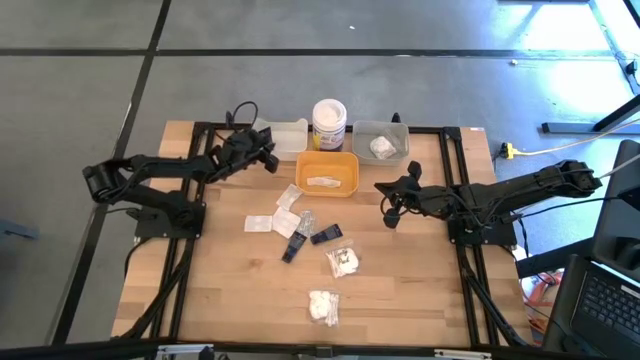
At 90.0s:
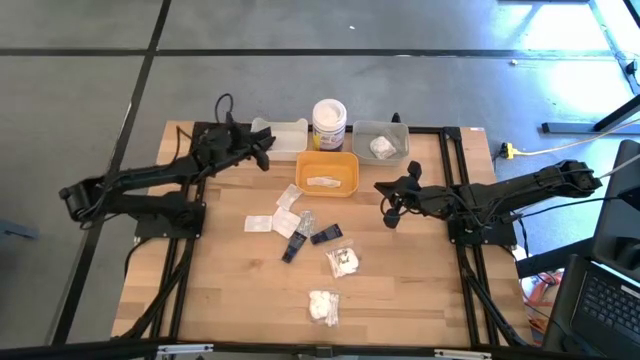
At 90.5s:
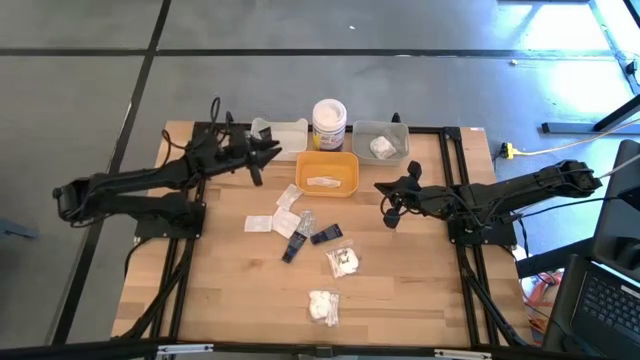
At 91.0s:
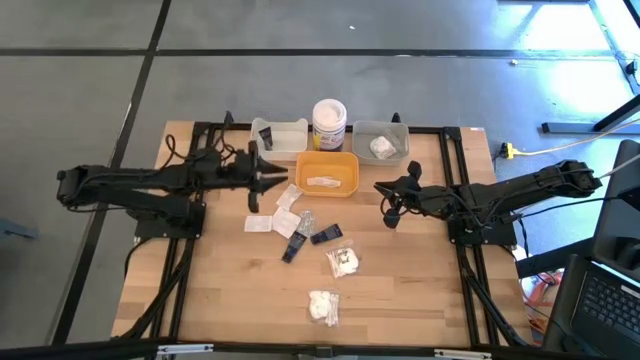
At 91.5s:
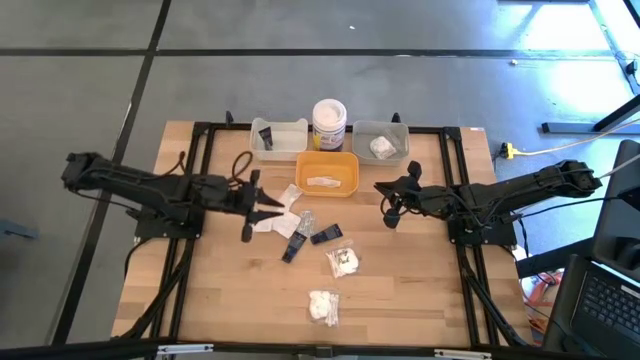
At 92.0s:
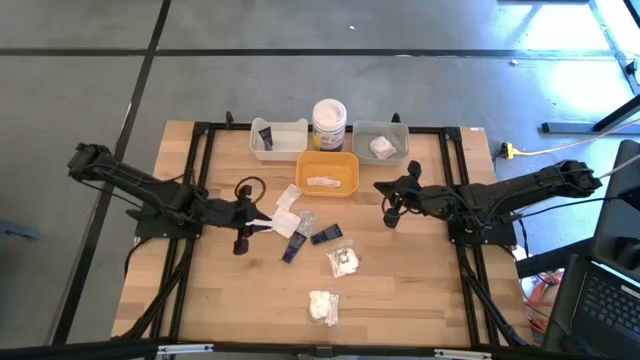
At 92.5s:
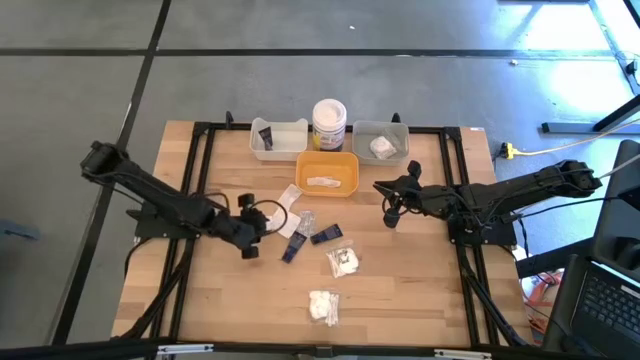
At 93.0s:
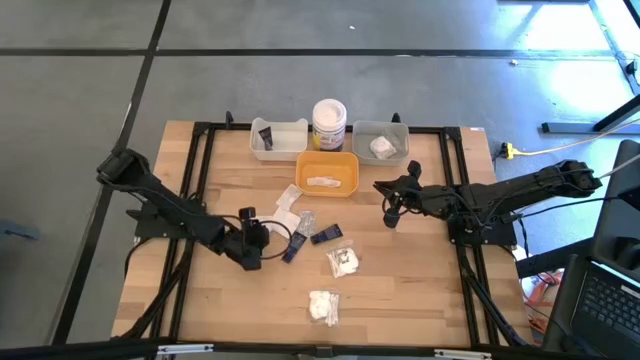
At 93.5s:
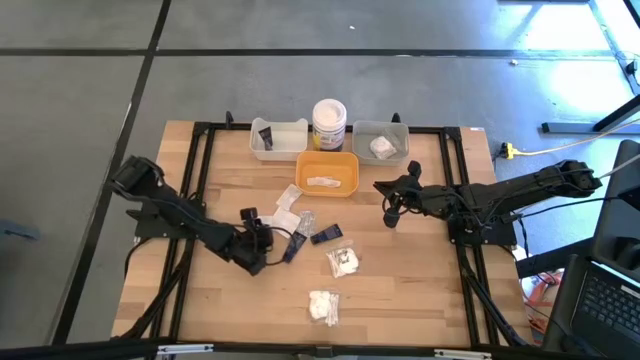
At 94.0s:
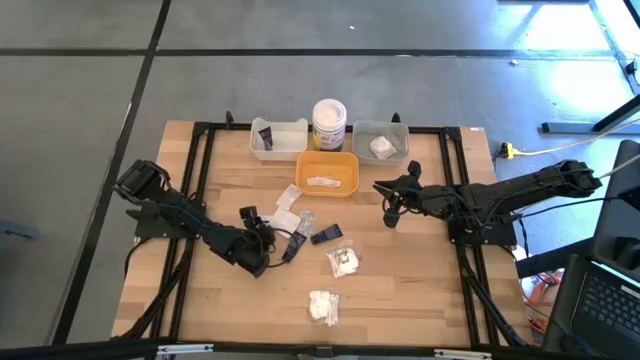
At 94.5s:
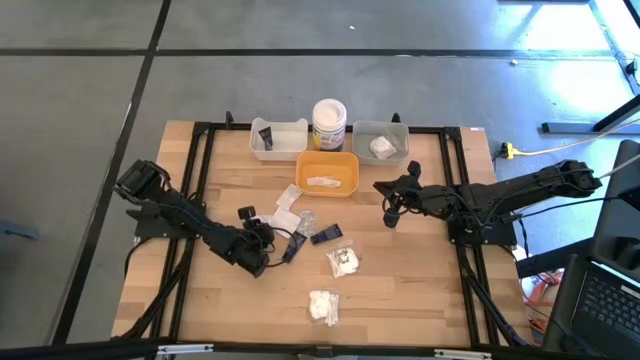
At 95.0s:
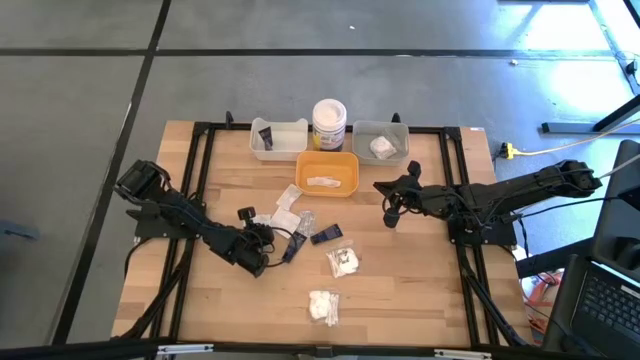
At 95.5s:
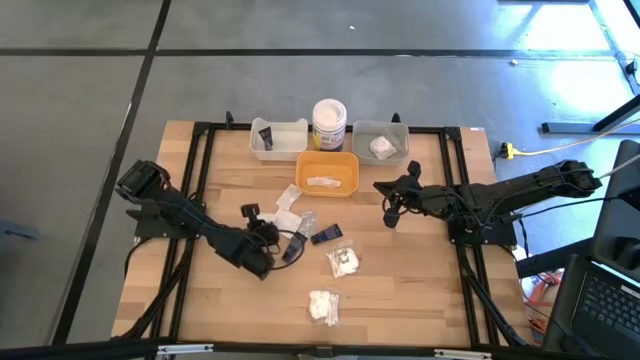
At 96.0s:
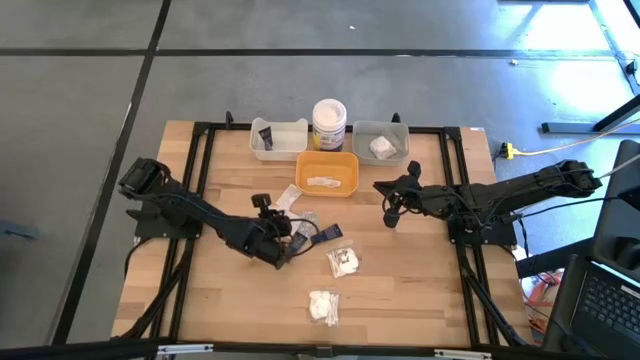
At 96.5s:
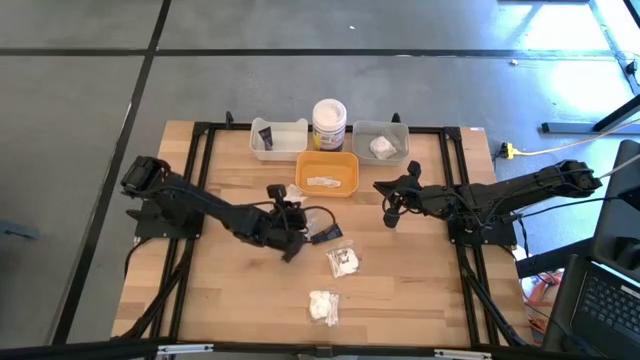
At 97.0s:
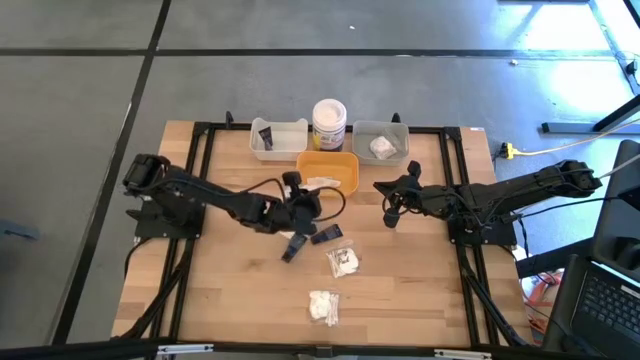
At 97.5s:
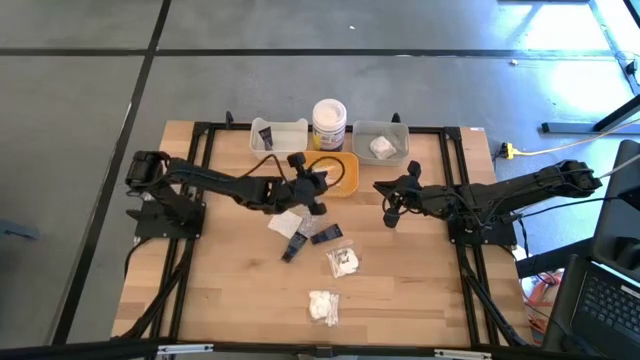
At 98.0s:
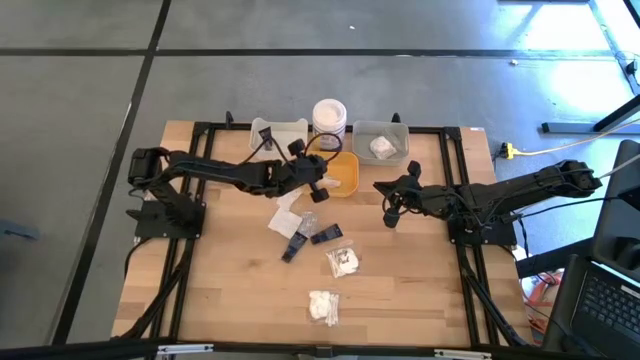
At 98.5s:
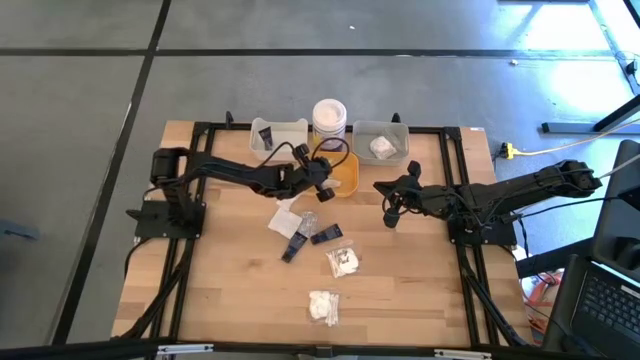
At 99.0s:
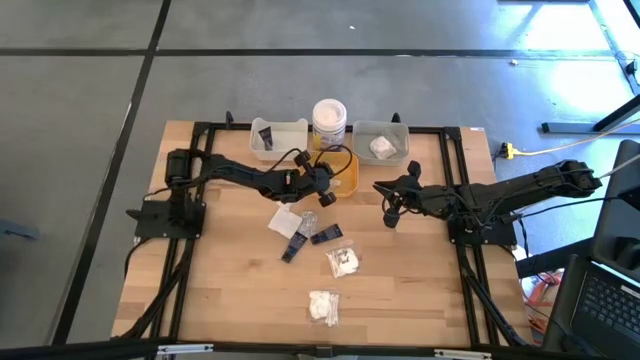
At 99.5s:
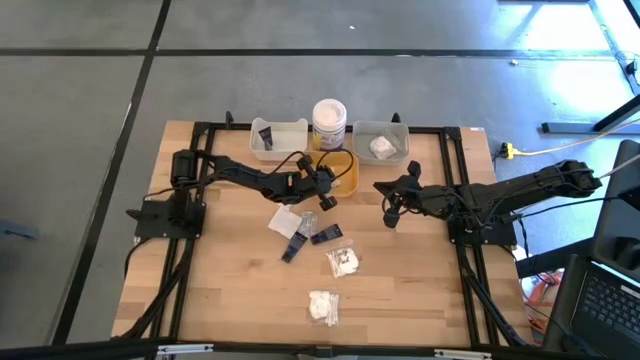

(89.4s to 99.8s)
Task: Pick & Place Travel size toiletries
Put the white bandage into the yellow bin

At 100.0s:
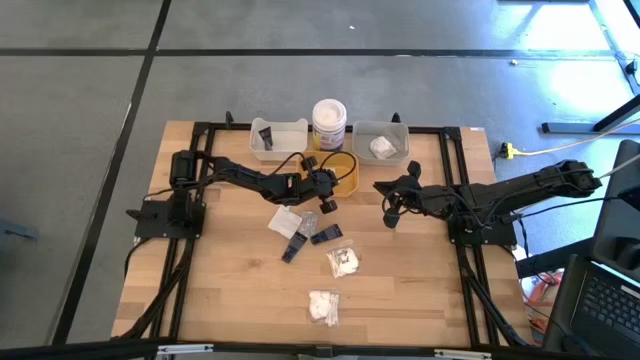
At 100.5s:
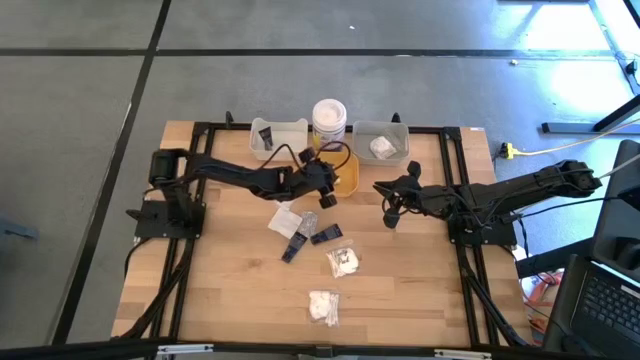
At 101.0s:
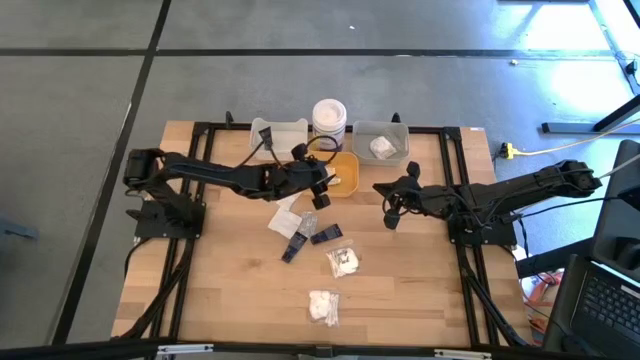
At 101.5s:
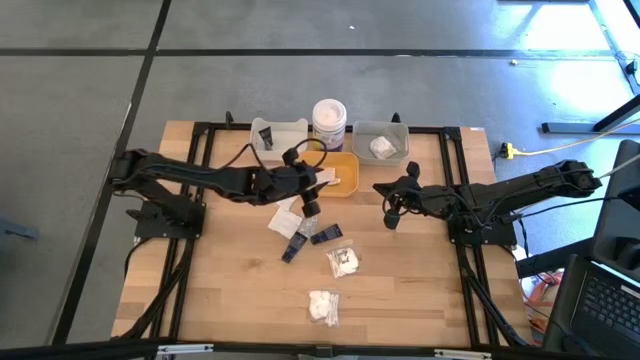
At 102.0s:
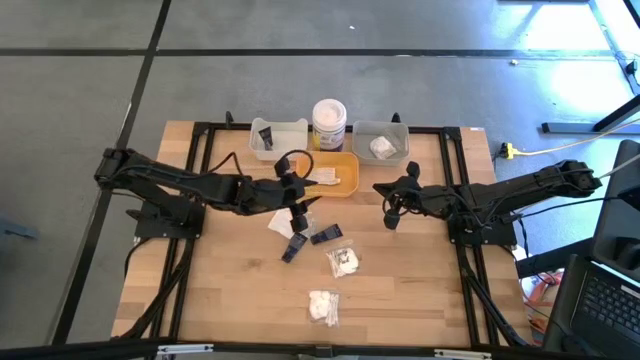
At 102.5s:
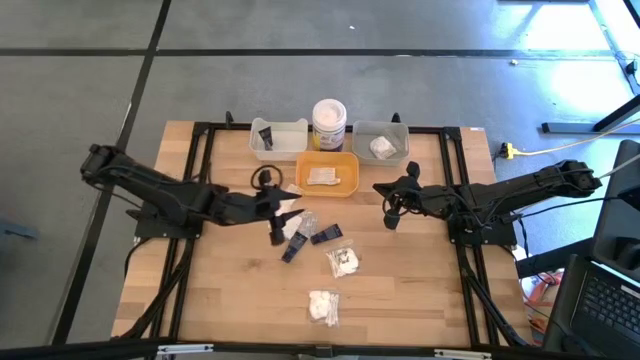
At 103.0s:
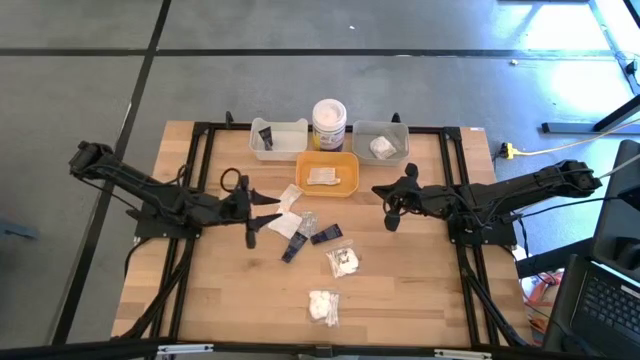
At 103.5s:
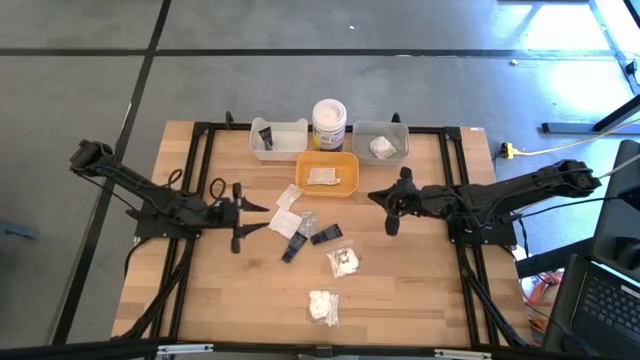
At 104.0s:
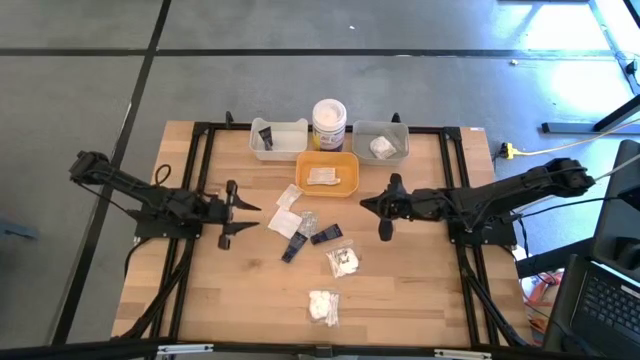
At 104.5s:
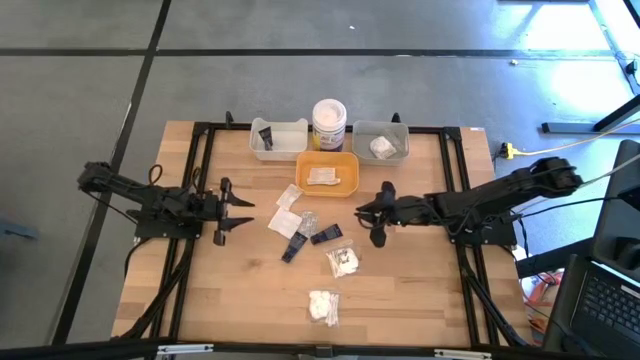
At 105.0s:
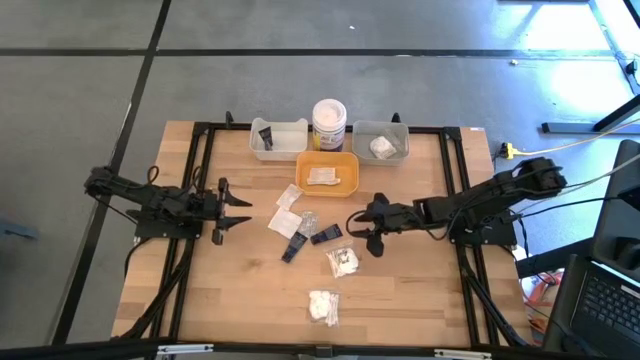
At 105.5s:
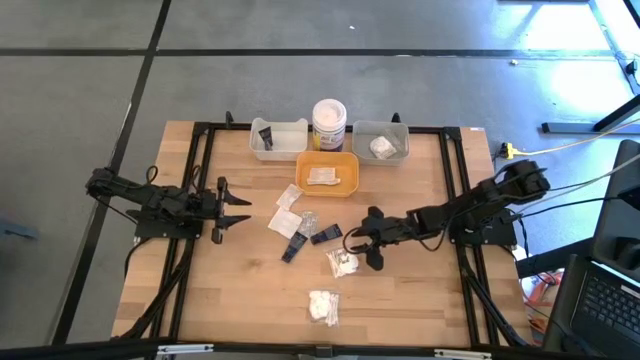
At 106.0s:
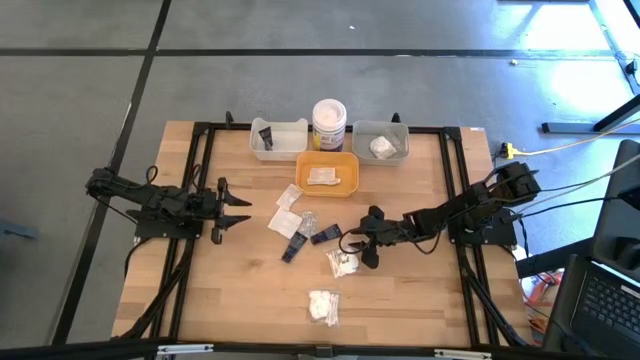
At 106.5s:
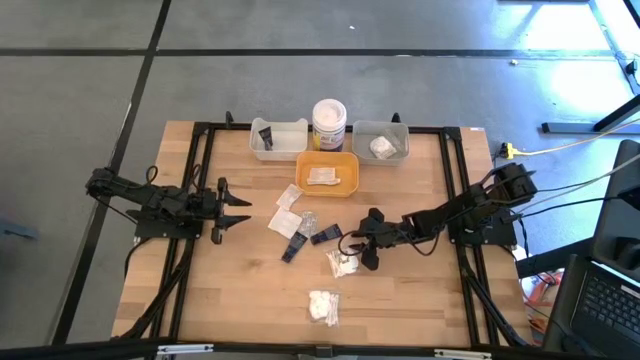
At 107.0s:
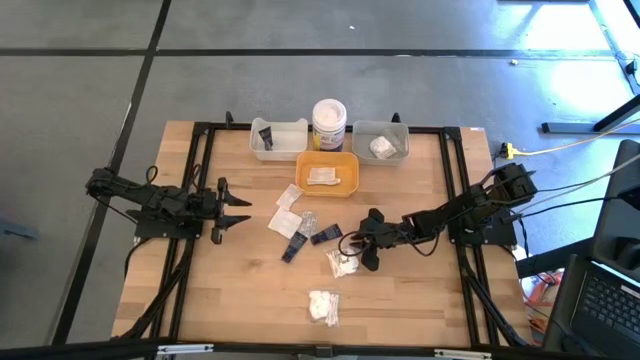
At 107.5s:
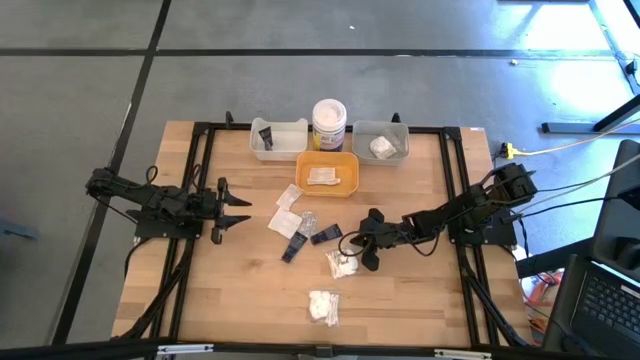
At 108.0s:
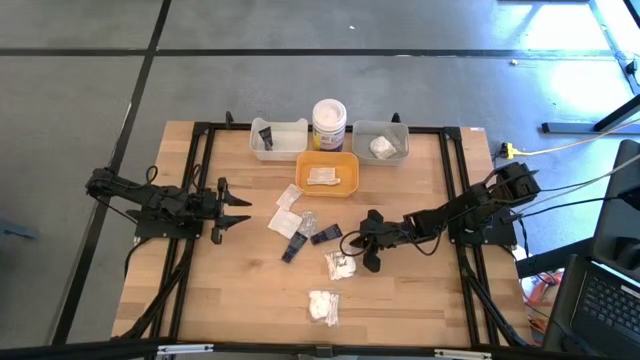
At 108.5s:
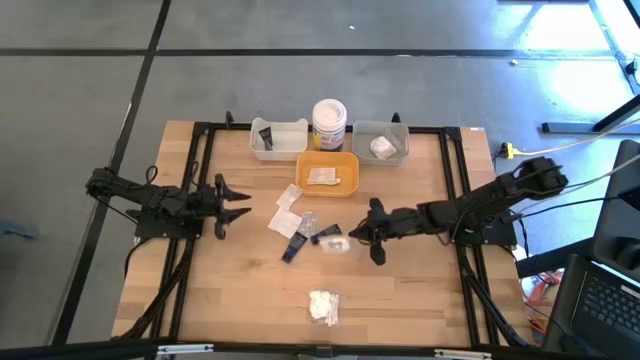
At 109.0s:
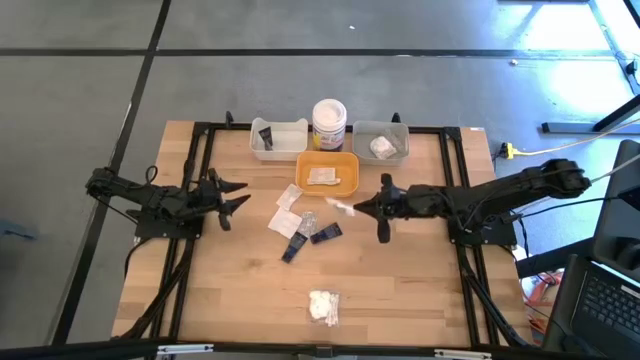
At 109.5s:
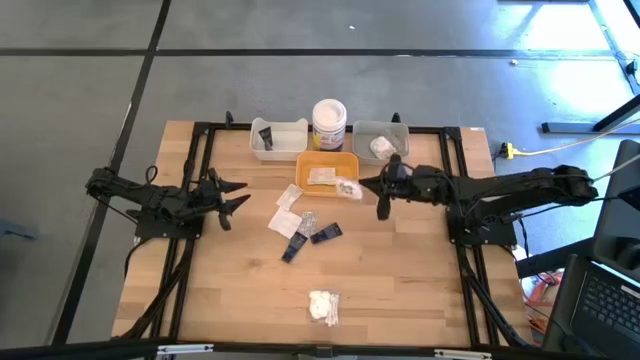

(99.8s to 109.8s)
Put the white cotton pack into the gray bin

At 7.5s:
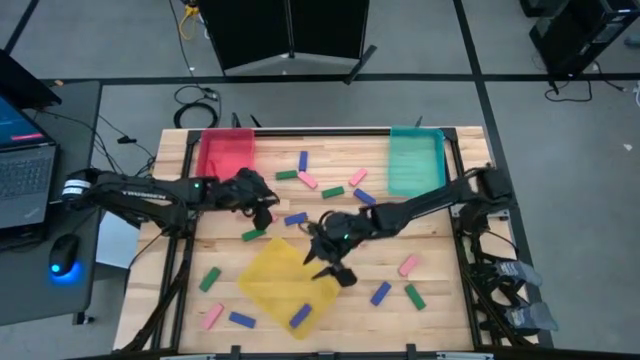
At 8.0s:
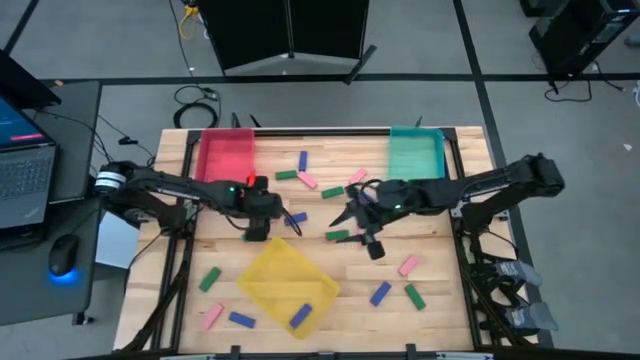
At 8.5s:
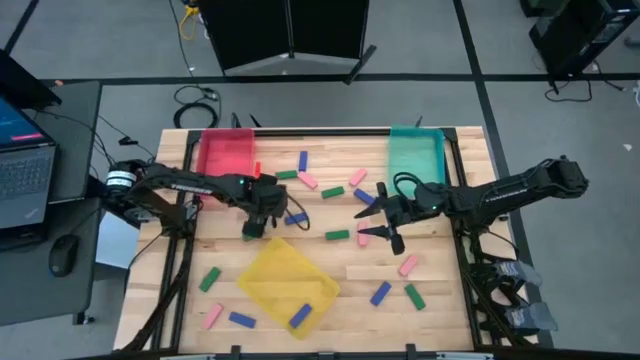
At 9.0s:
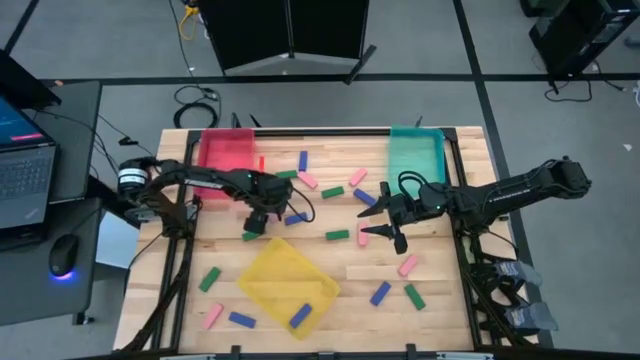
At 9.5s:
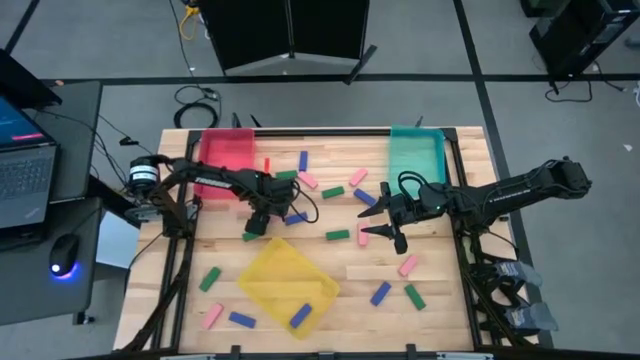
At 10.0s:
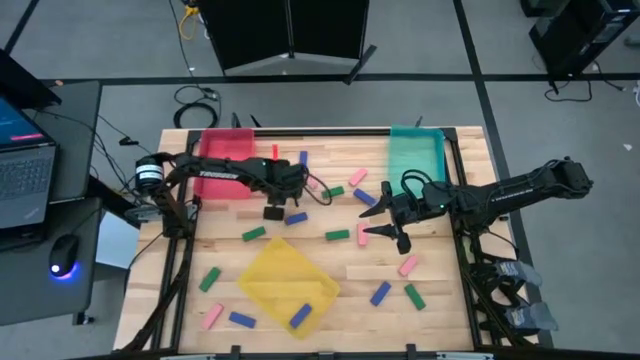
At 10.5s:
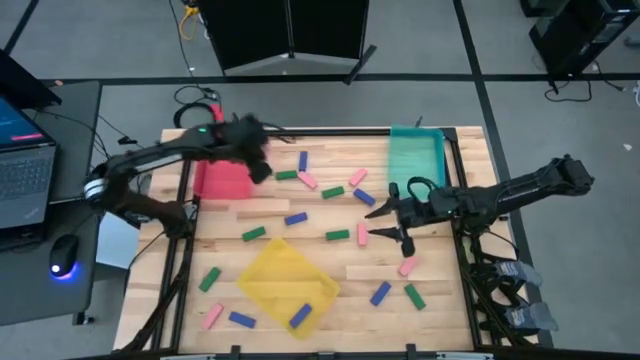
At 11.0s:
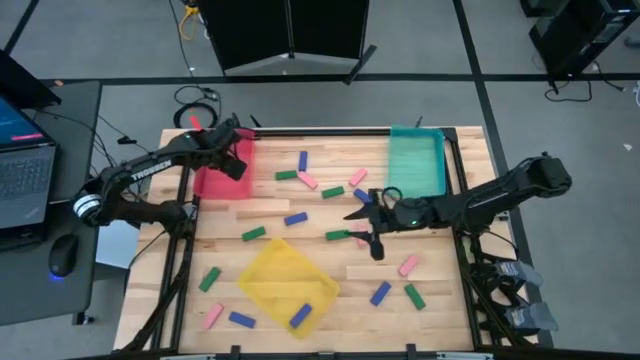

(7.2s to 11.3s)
Task: Sort blocks
Put the pink block into the red bin
